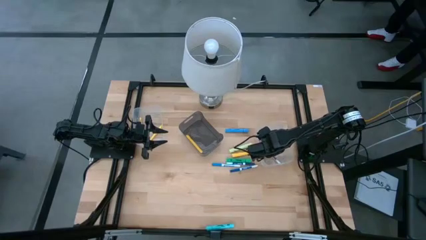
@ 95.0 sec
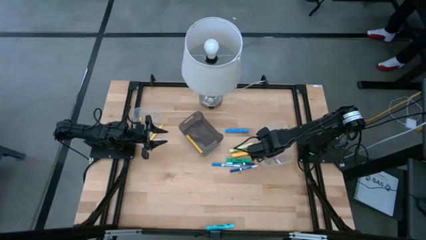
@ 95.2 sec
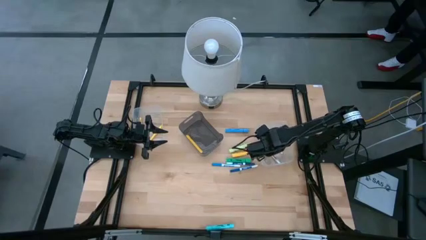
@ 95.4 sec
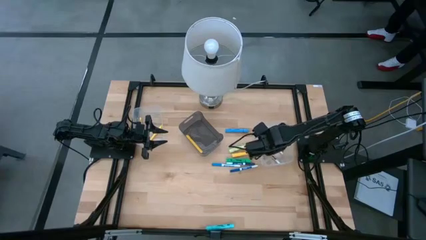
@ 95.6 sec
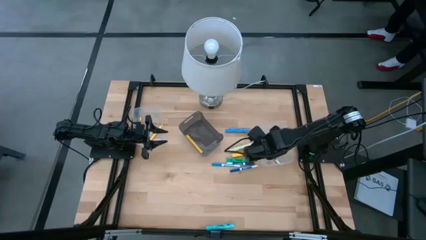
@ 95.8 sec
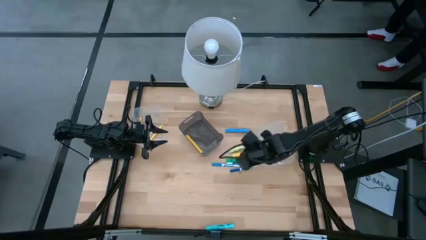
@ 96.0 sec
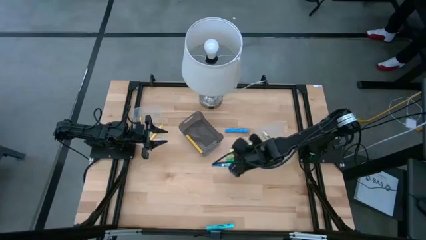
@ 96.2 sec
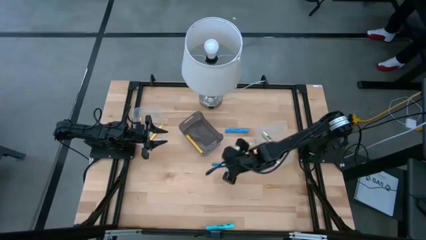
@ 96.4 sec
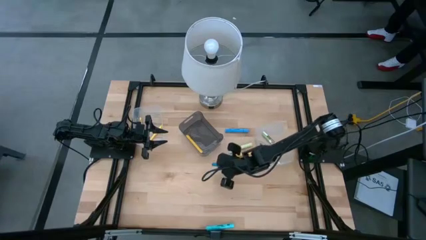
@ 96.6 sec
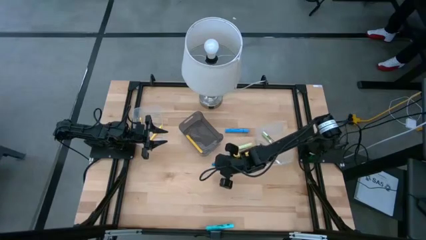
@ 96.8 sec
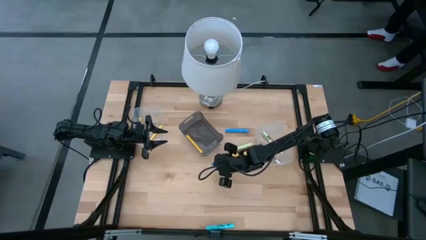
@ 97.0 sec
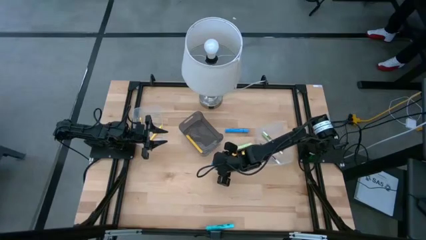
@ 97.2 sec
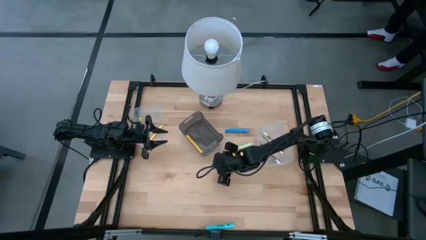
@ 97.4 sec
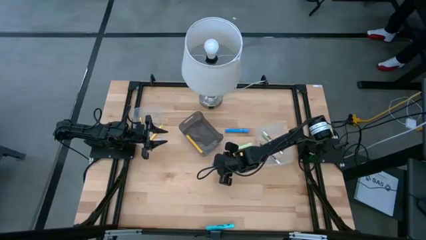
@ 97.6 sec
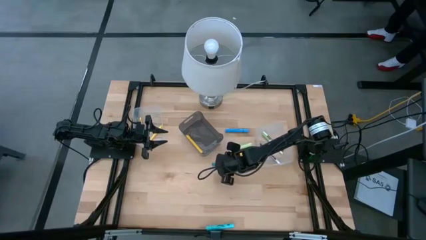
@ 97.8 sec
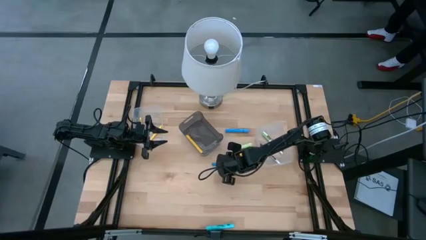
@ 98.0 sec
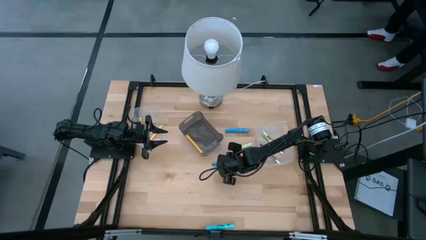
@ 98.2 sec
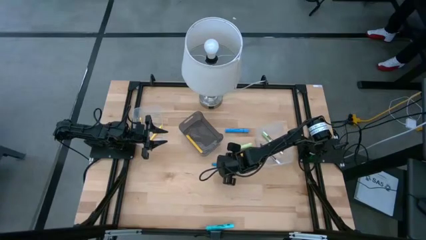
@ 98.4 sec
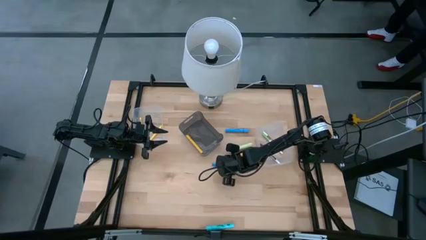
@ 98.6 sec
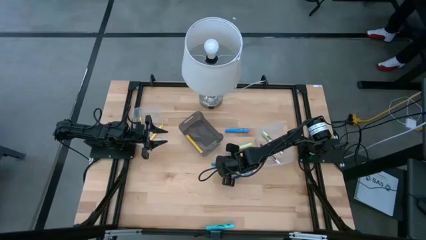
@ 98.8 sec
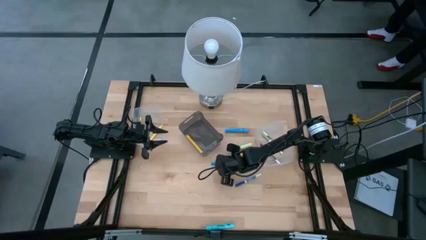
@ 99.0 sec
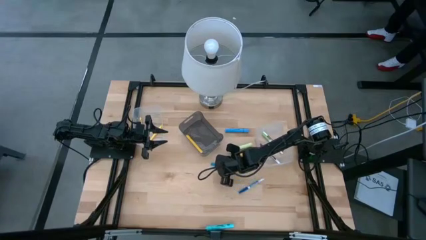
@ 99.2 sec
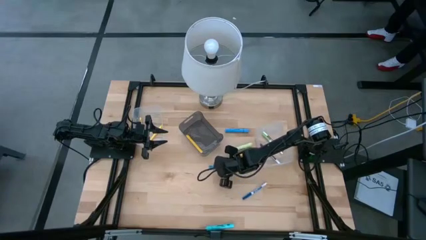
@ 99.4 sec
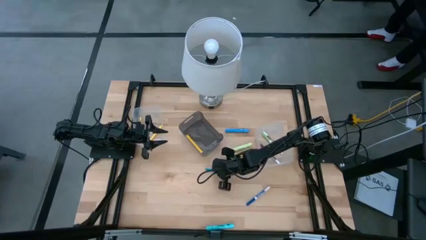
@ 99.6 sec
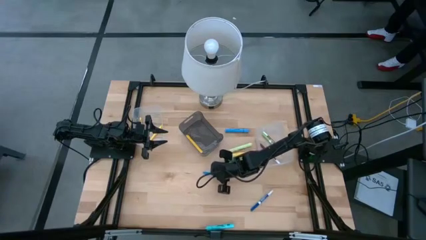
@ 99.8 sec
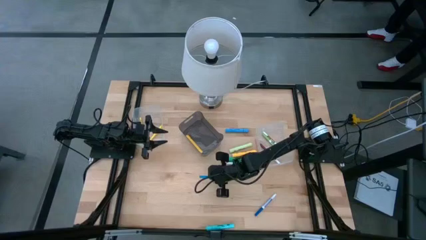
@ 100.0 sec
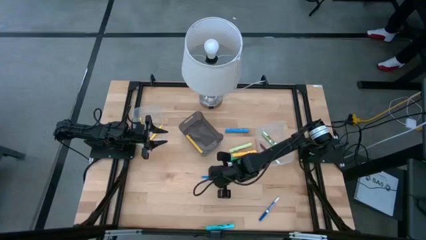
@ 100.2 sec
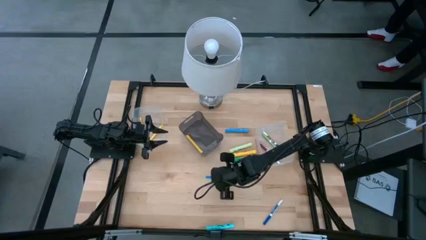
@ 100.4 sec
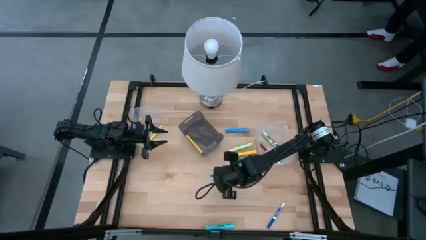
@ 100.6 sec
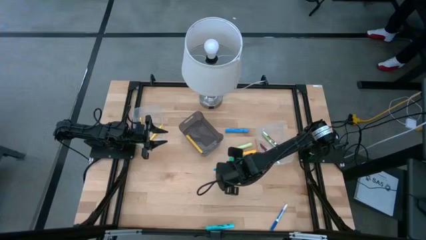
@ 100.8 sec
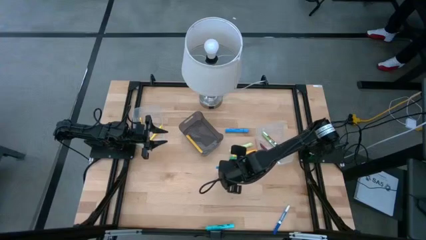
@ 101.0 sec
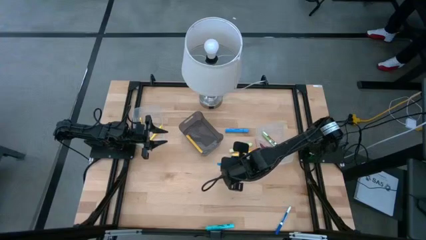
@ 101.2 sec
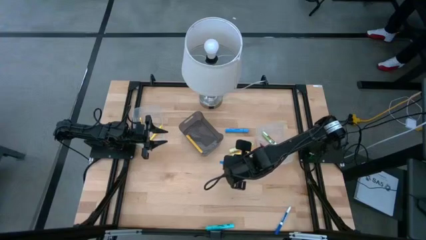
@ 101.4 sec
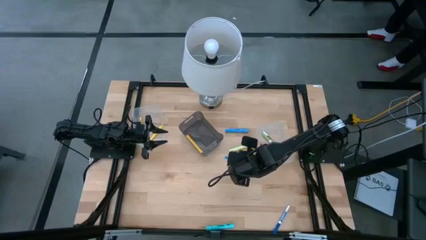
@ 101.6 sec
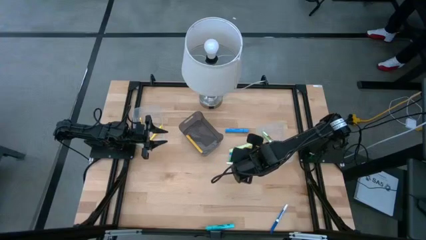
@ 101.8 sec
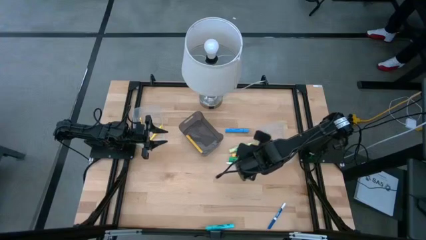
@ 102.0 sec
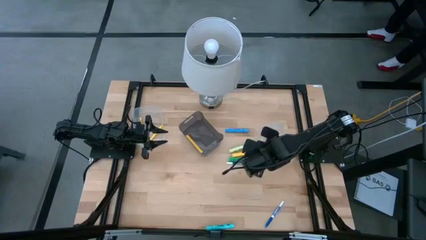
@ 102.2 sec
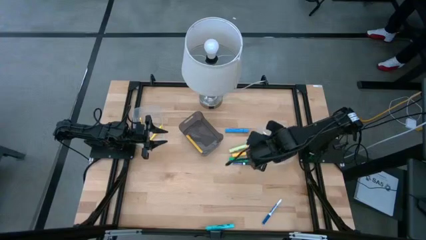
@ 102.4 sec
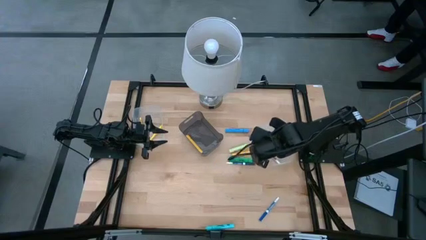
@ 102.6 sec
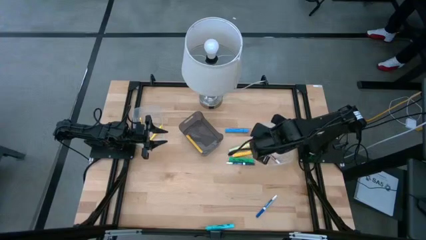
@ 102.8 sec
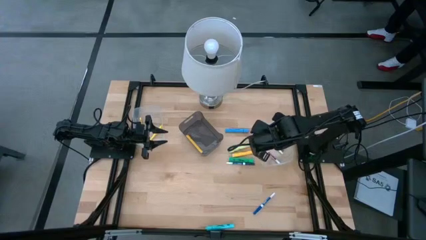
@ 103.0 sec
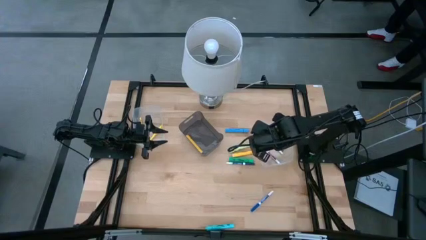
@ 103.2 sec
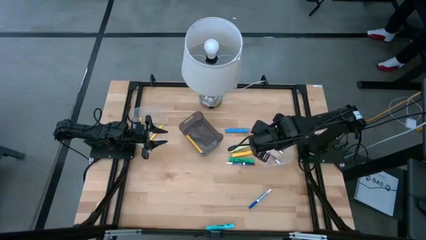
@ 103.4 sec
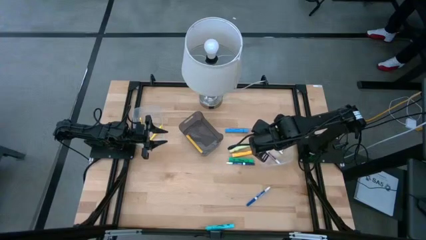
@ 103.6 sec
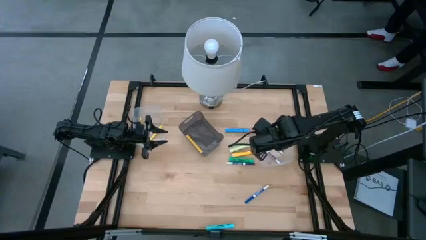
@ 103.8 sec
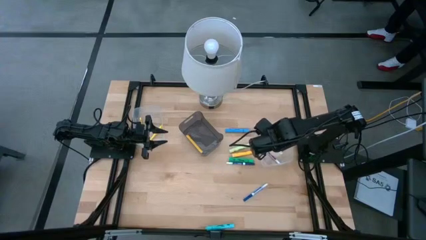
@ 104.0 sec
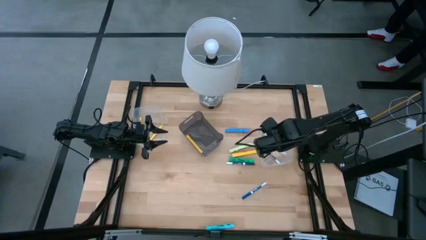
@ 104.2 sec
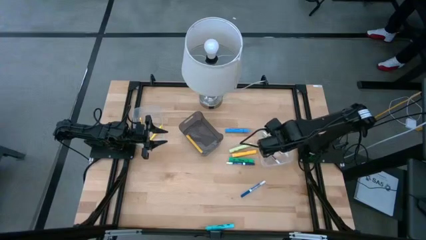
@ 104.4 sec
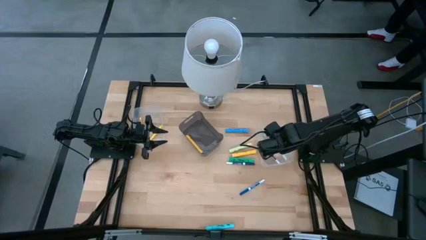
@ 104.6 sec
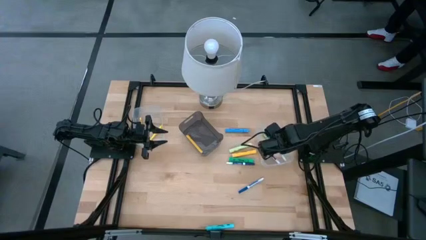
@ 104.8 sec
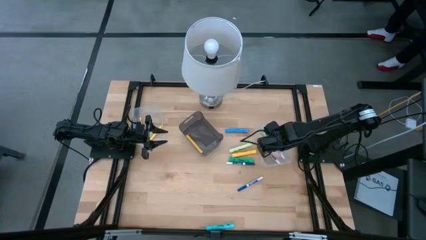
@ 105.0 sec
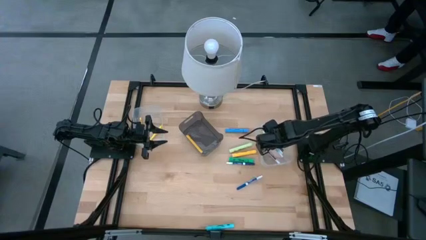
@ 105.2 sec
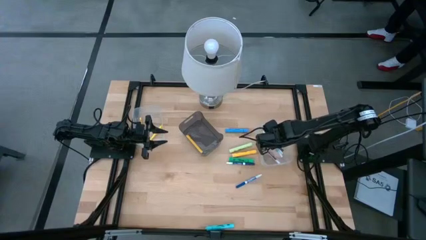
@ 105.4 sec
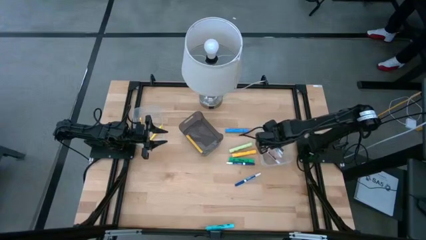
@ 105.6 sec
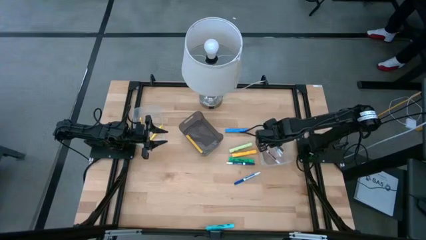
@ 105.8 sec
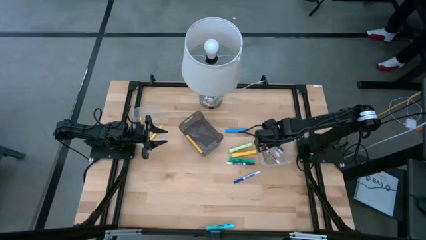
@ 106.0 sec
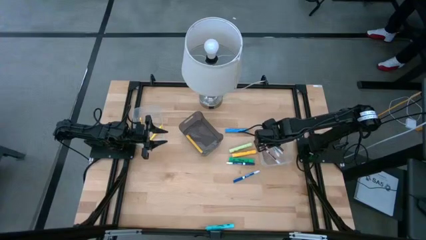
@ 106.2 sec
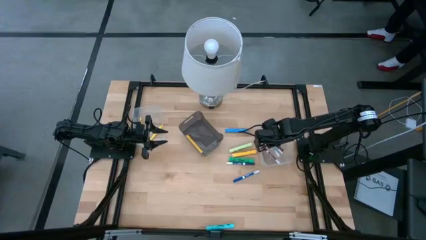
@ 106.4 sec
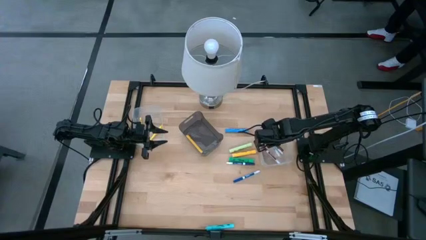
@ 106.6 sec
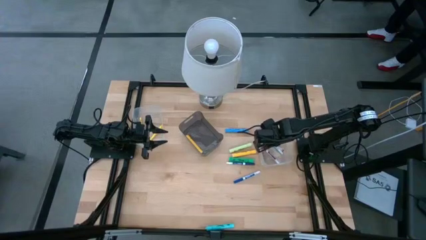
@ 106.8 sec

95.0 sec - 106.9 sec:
Task: Pick & Place Markers
Put the light blue highlighter into the right transparent bin
